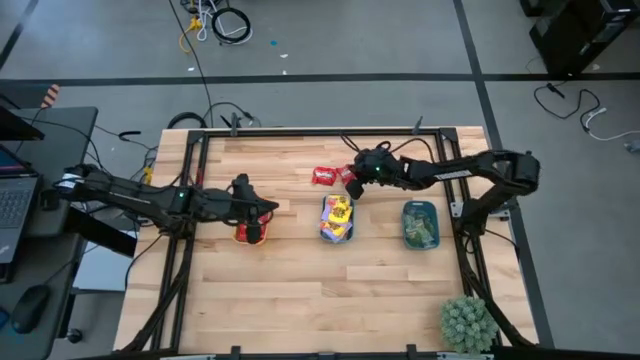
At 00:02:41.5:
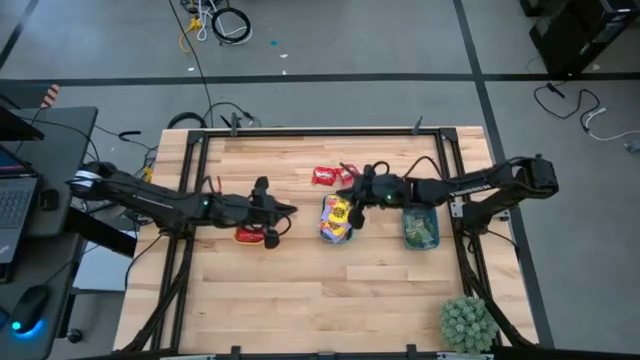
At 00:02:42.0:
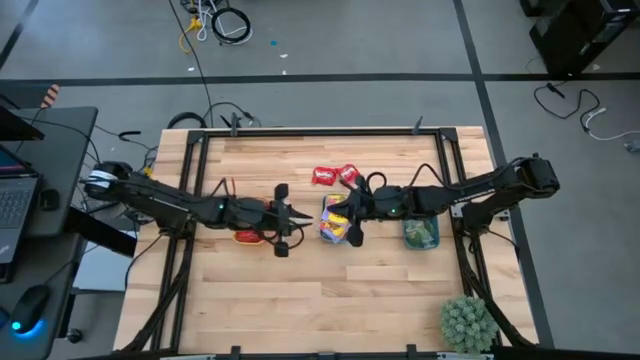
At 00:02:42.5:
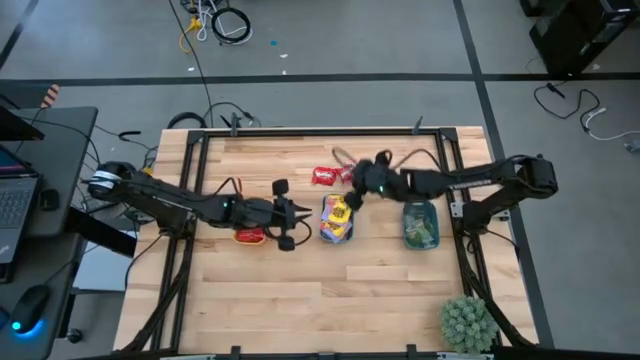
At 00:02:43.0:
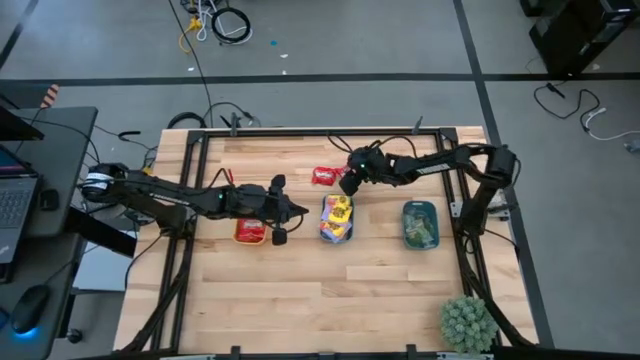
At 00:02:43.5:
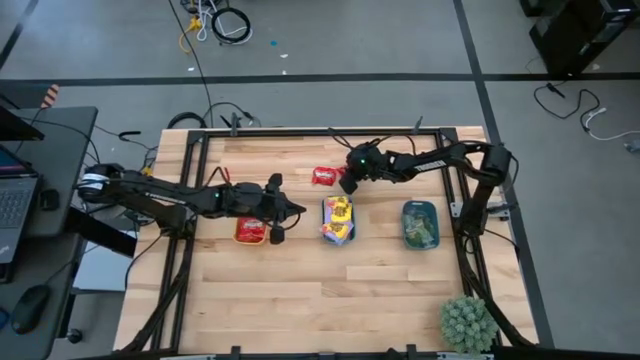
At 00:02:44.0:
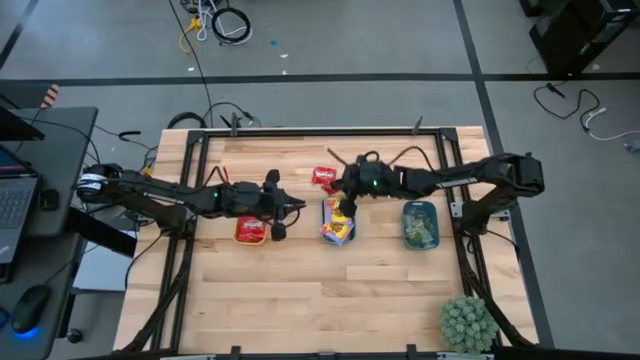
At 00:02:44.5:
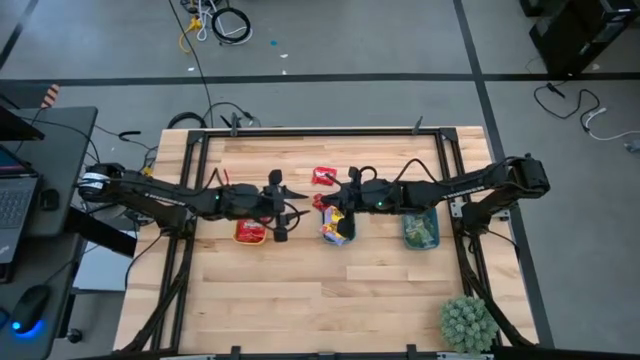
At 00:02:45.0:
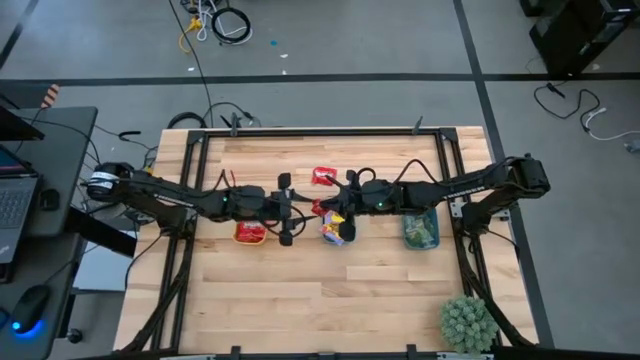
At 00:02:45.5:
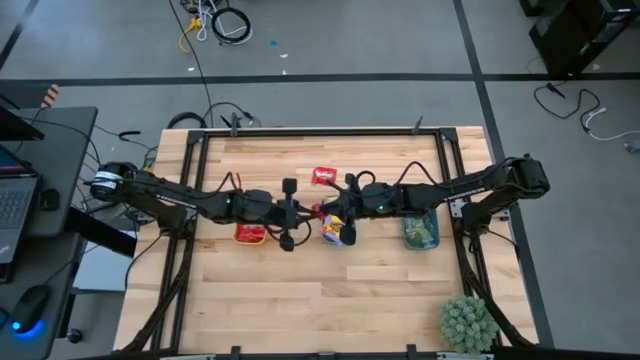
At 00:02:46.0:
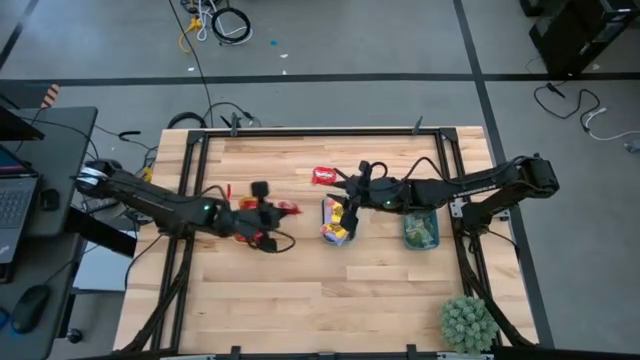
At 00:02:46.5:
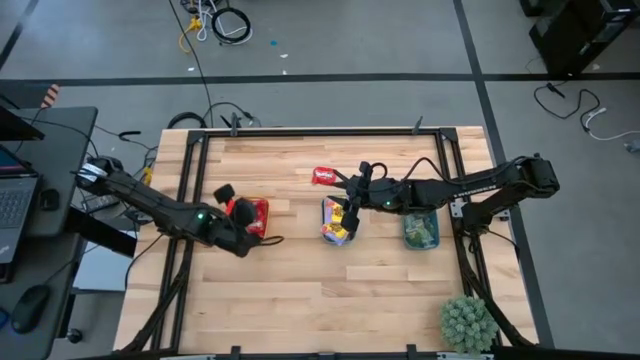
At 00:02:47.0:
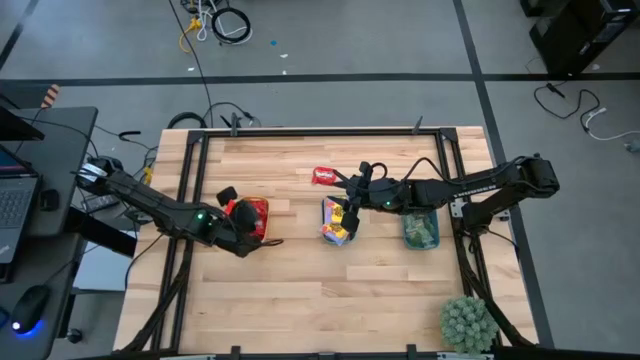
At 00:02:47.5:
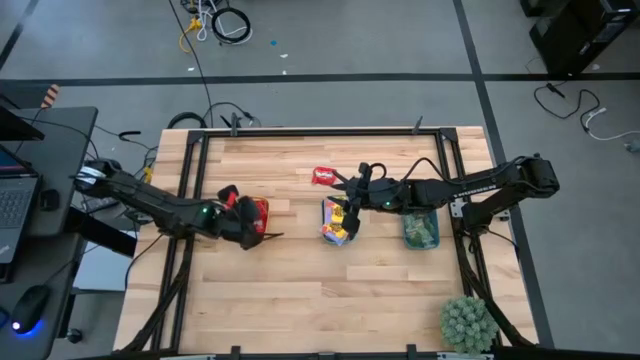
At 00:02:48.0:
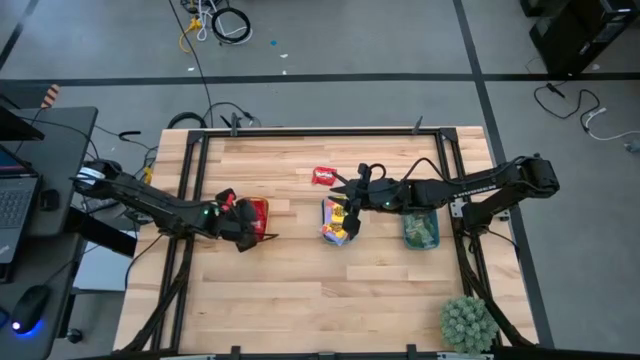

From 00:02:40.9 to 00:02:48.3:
Task: Sort candy
Put the red candy pack into the yellow bin

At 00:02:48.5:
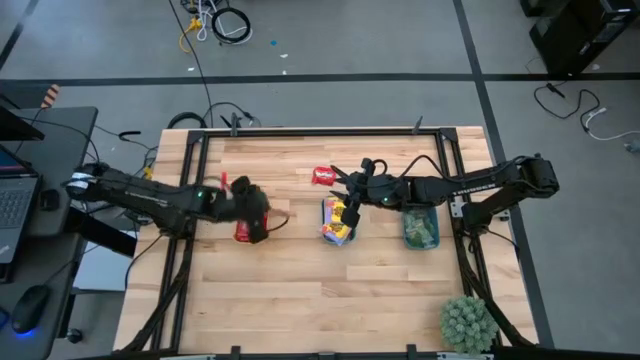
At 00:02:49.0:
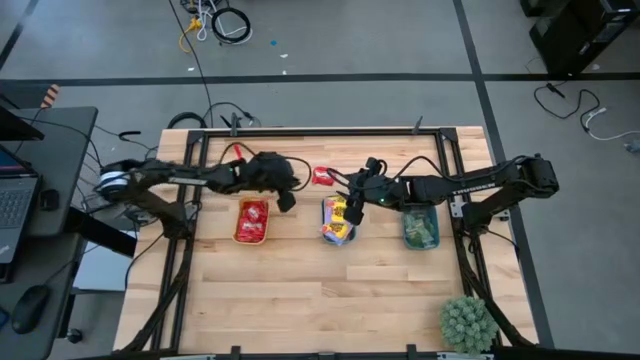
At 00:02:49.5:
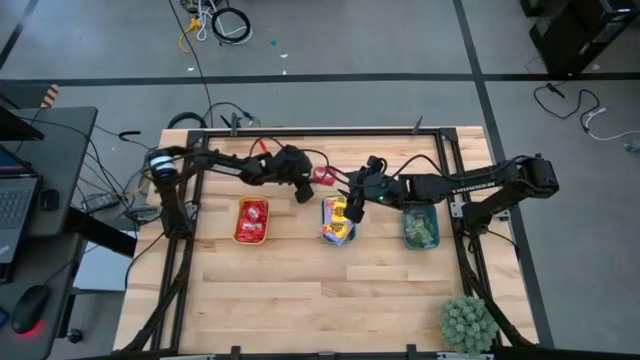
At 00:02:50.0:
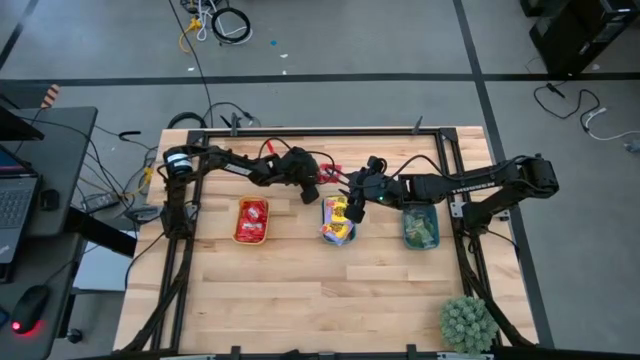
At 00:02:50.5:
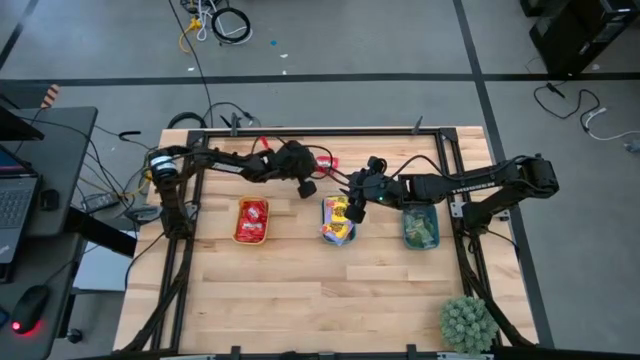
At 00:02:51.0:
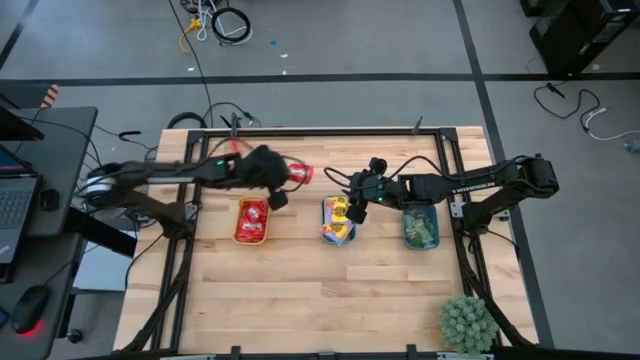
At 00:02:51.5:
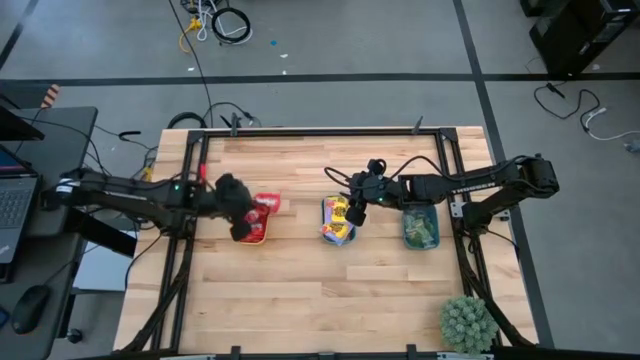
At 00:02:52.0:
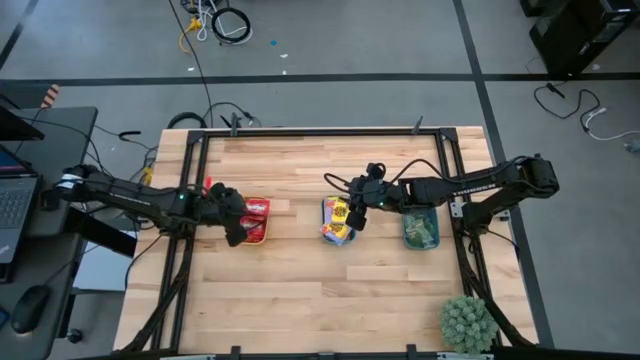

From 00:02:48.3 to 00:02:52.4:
Put the red candy pack into the yellow bin

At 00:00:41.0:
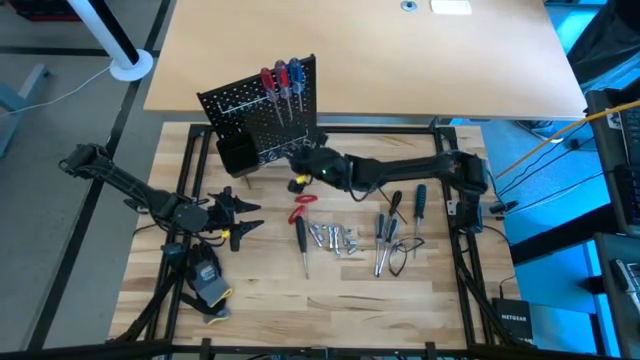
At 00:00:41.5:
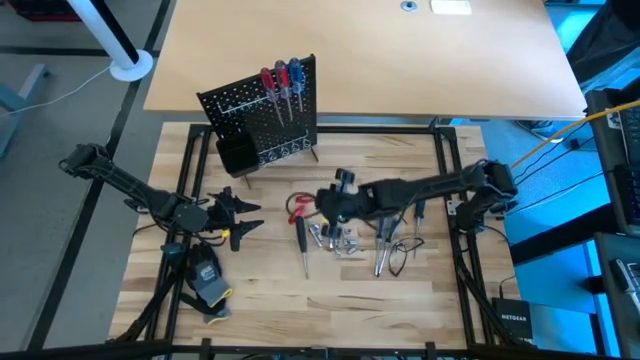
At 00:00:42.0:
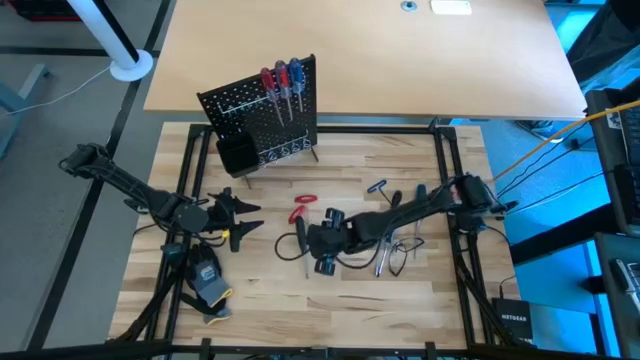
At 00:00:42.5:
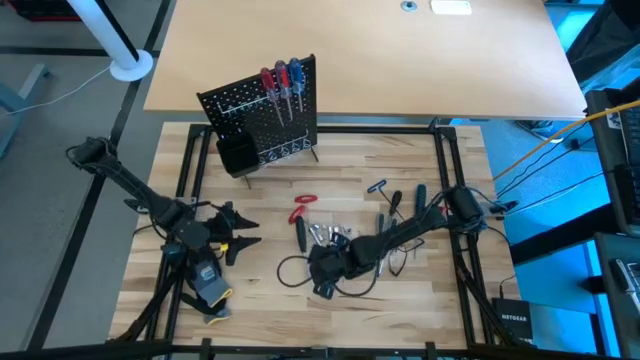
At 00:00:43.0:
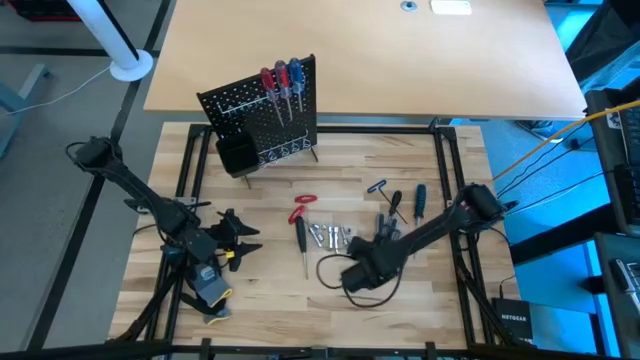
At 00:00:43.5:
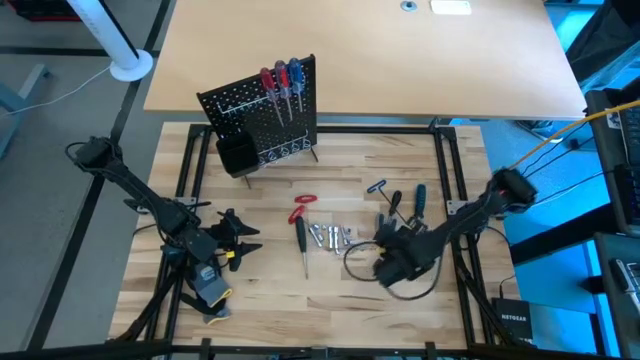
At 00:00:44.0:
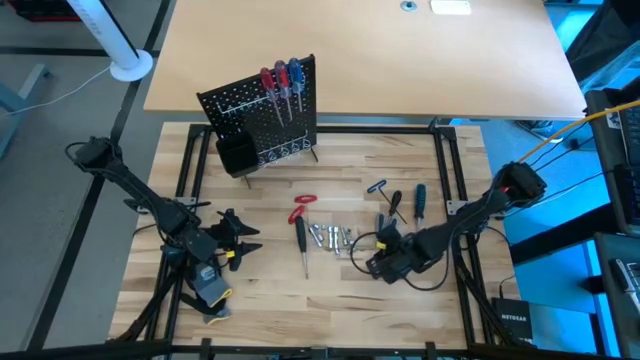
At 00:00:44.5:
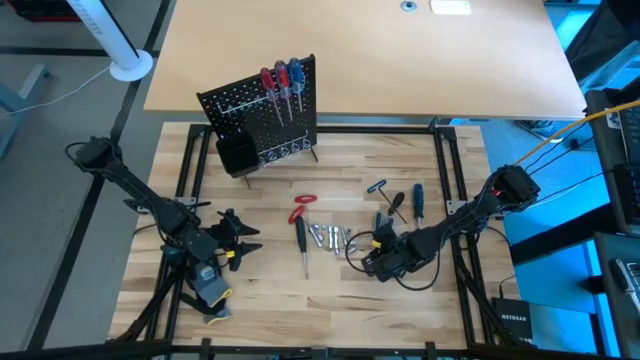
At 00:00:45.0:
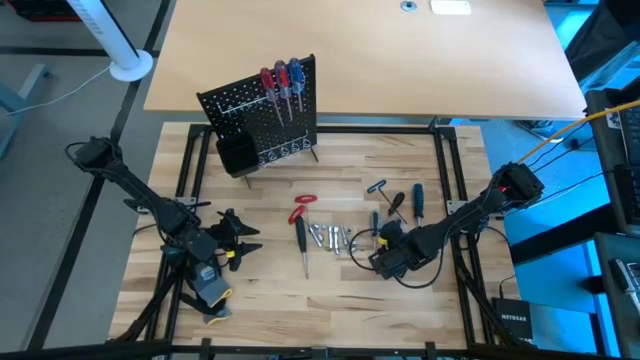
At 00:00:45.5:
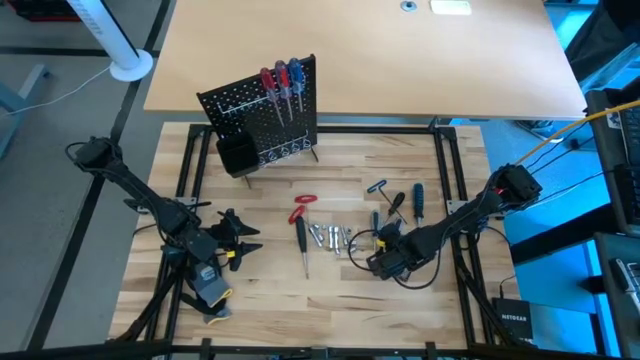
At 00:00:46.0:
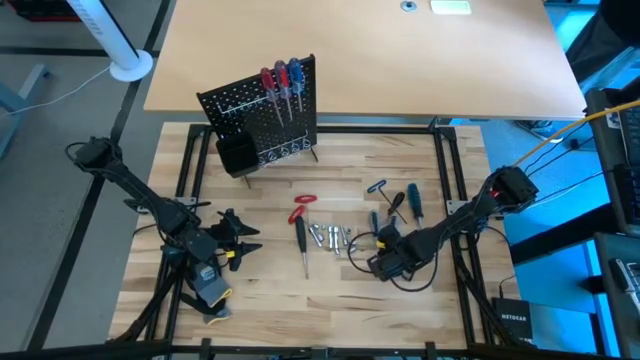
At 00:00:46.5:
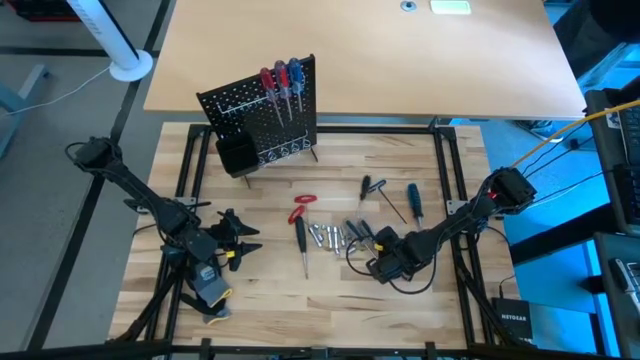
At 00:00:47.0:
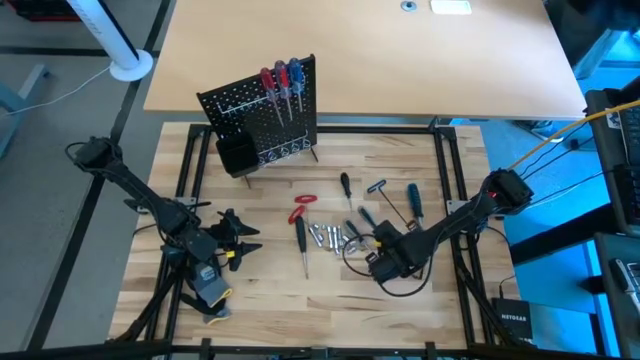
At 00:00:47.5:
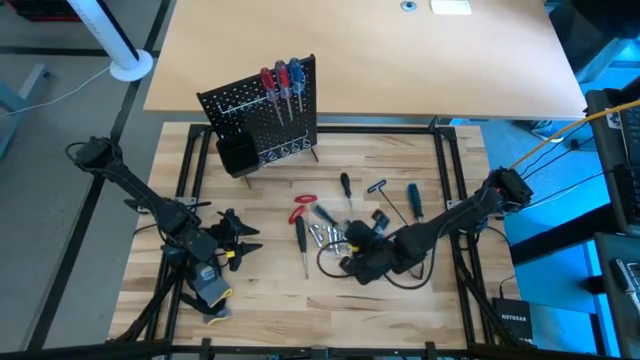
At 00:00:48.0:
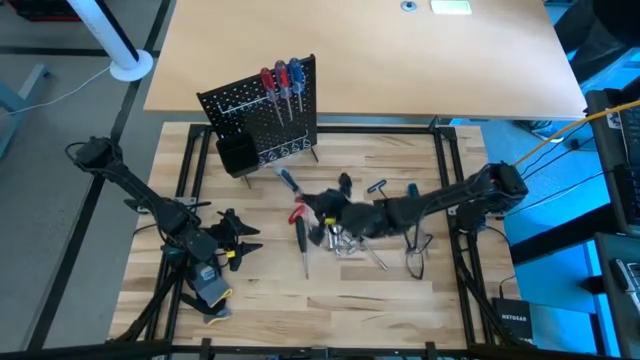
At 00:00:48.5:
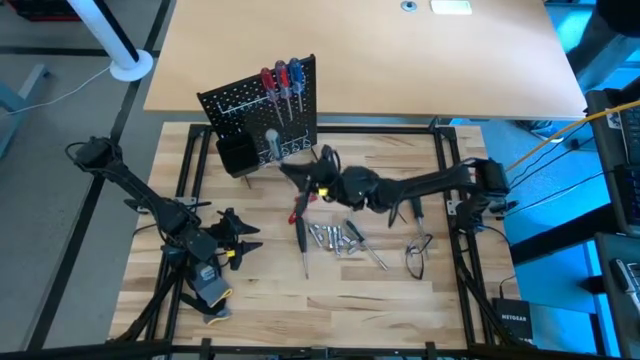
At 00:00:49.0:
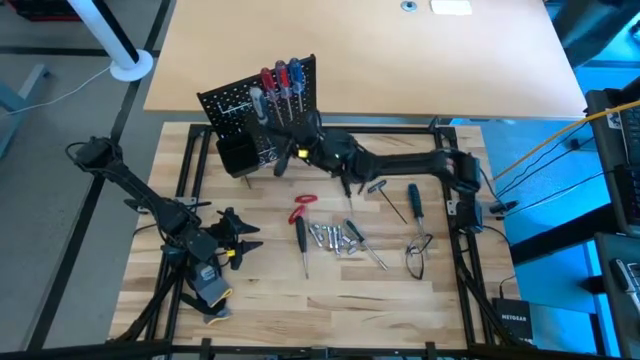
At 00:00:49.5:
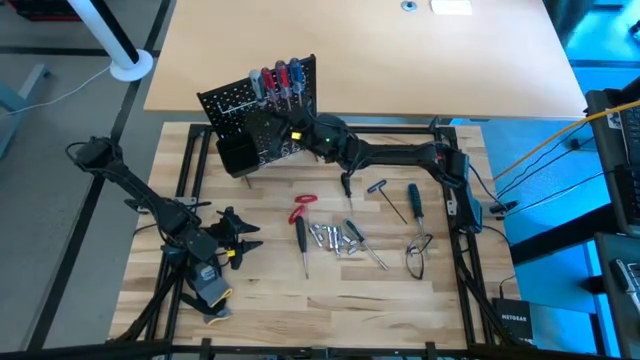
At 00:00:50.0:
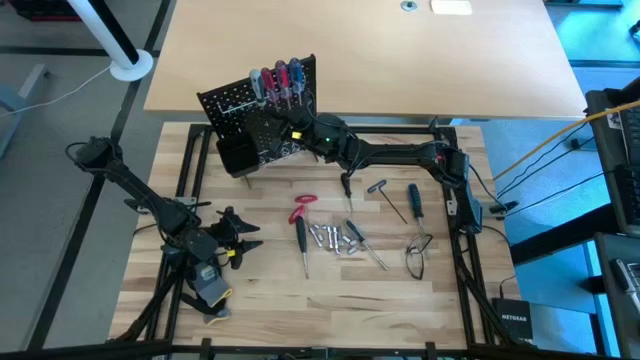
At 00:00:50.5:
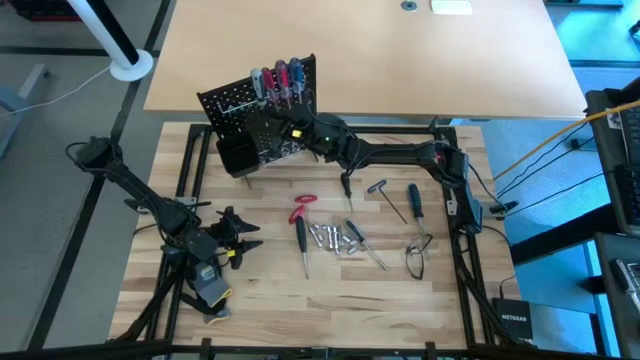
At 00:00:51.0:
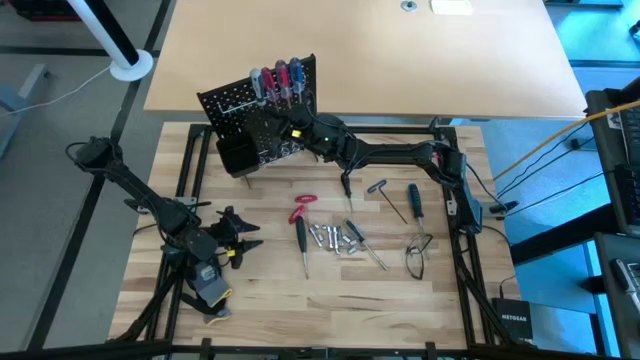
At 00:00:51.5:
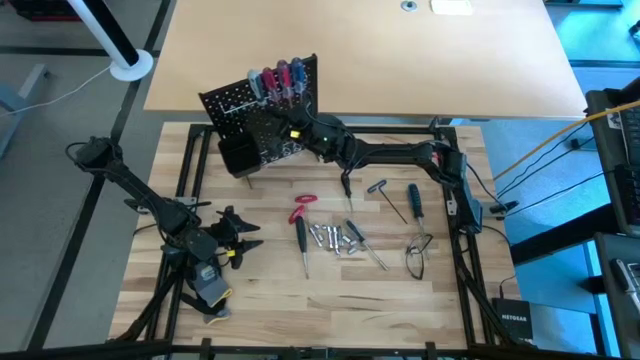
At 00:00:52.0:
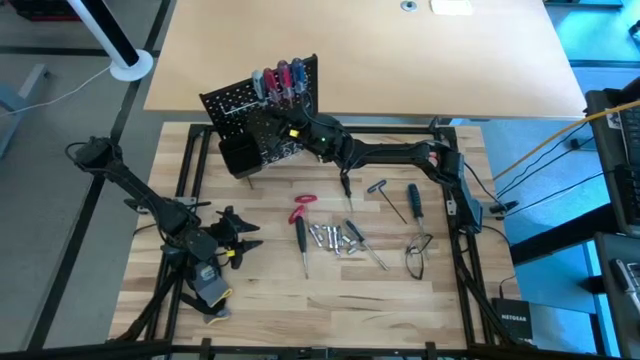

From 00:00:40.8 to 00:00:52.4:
Task: Hang tools onto peg board
Hang the gray screwdriver onto the peg board
